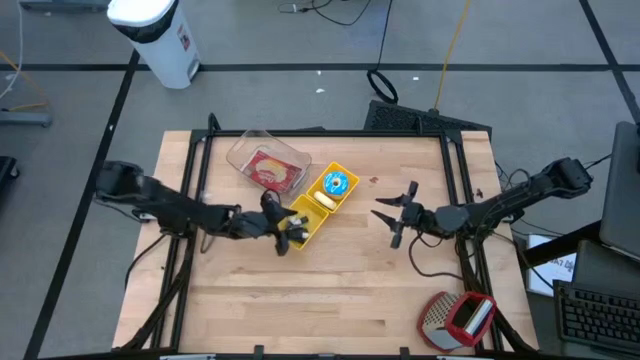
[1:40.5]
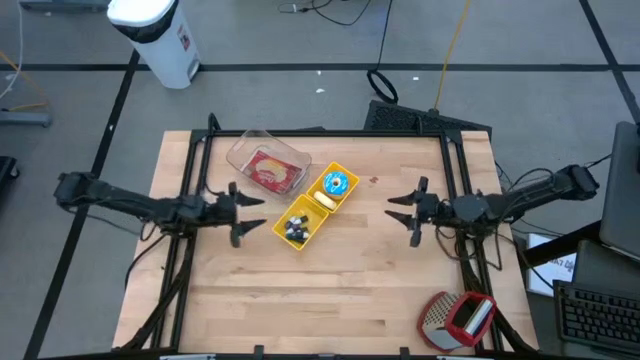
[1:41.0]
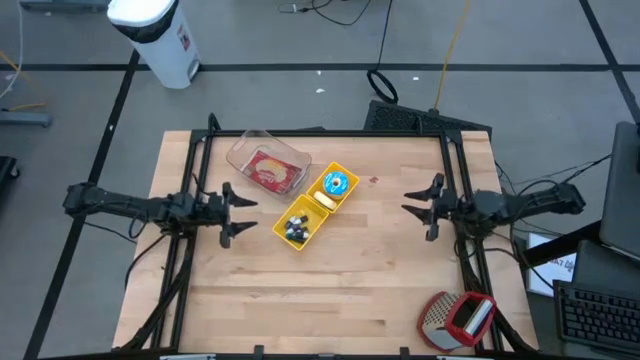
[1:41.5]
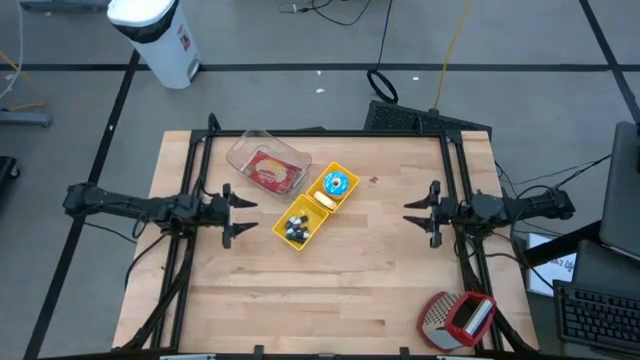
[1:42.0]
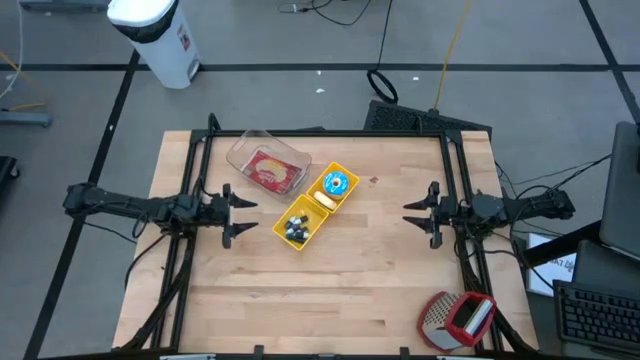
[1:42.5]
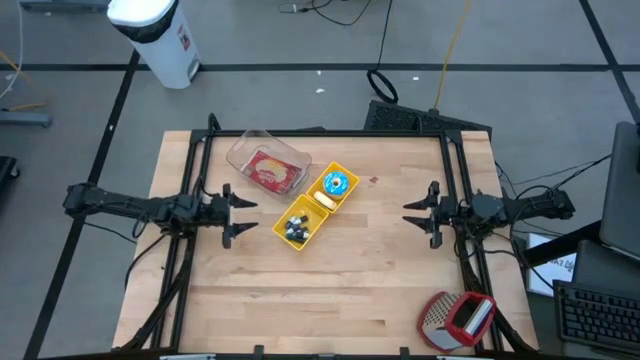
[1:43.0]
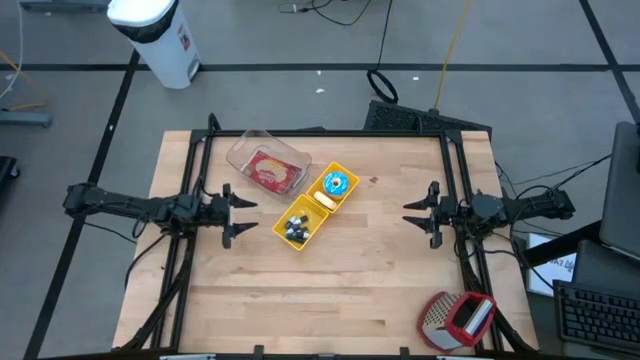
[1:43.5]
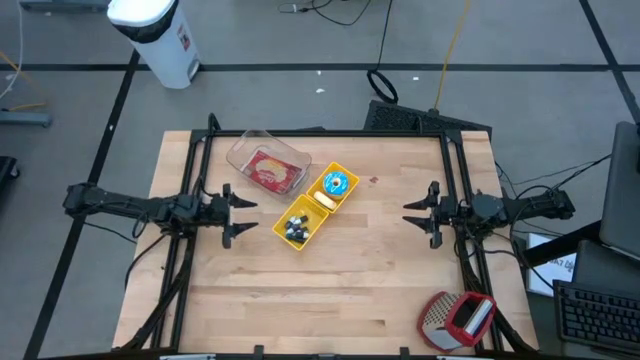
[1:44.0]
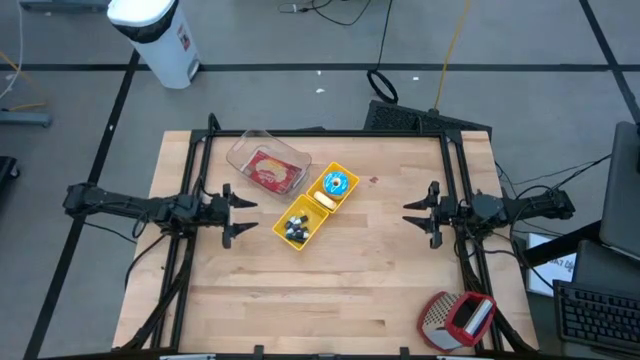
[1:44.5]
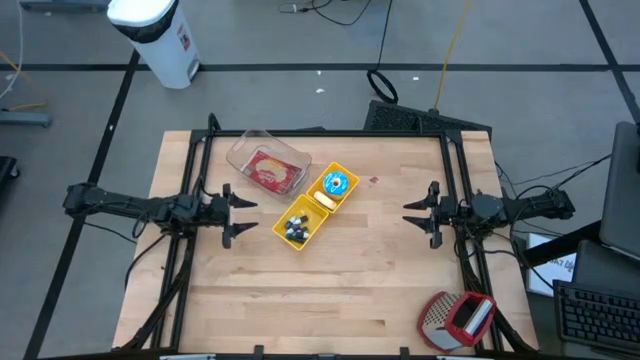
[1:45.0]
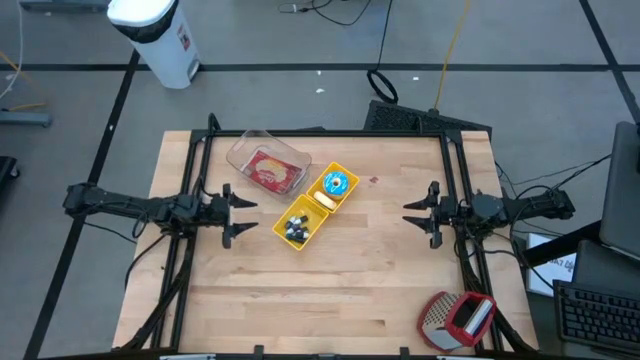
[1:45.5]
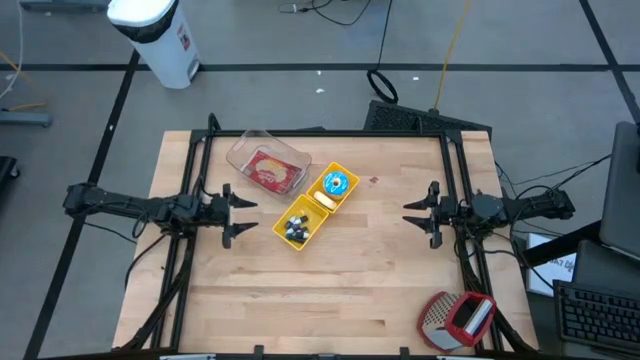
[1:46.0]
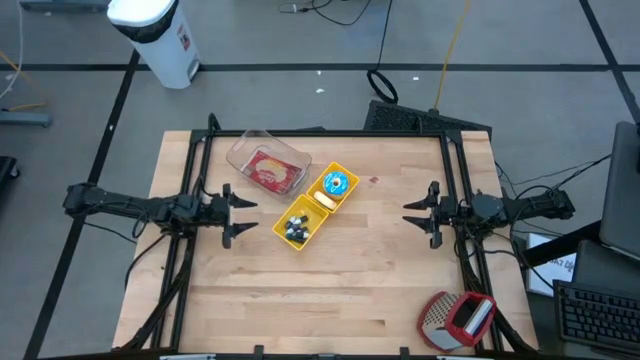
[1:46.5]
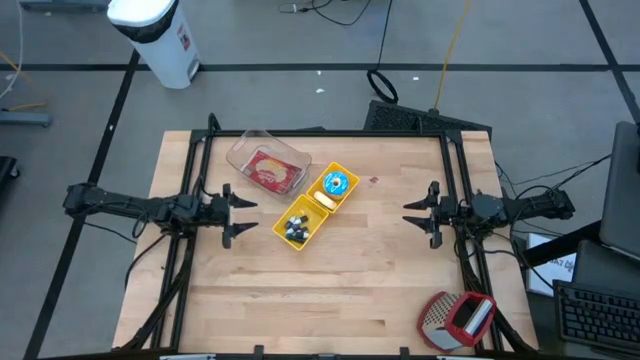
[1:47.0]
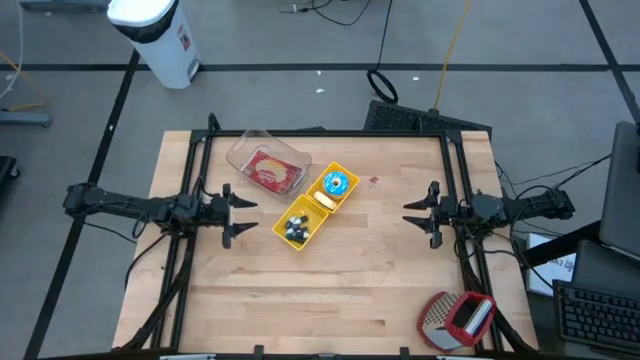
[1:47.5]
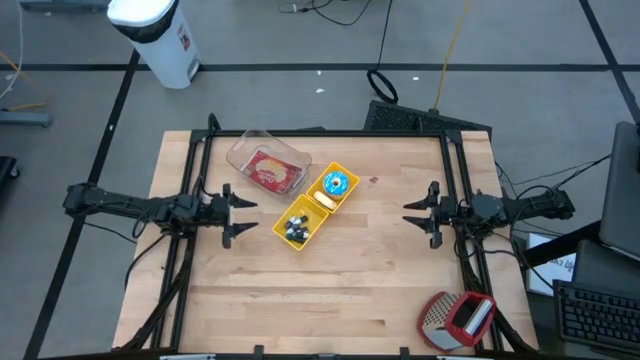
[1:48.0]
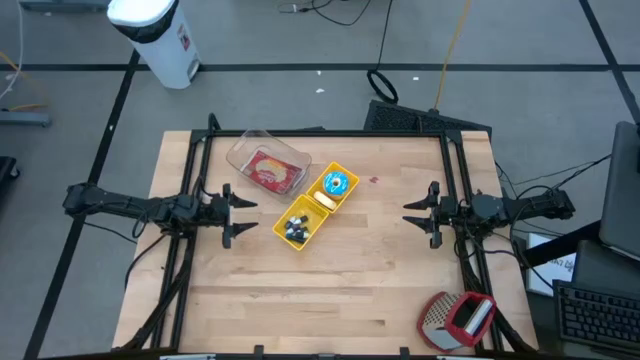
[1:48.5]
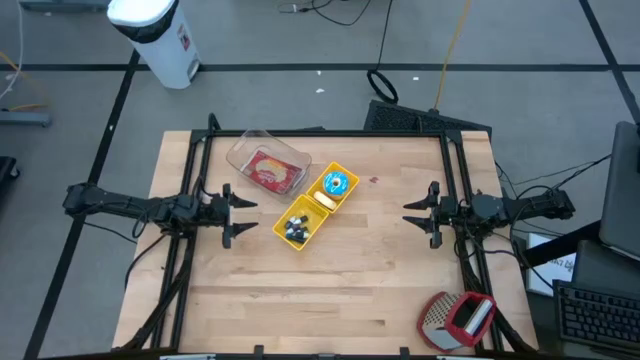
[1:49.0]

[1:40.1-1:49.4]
Return to Home Position
